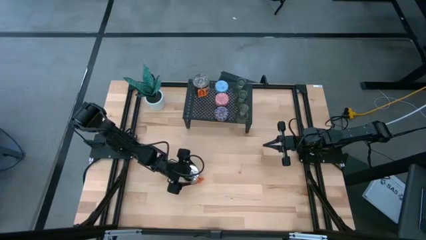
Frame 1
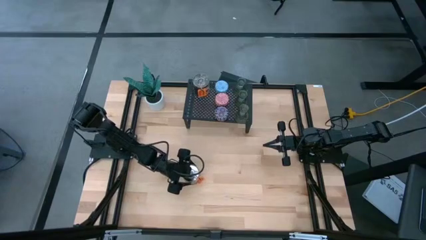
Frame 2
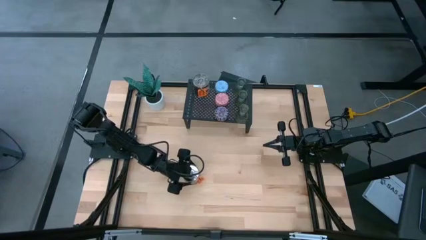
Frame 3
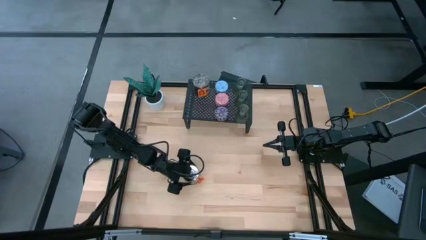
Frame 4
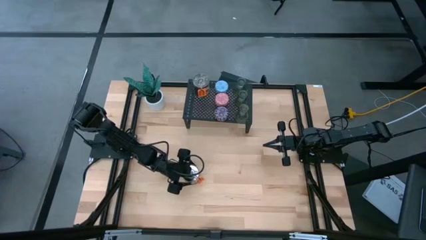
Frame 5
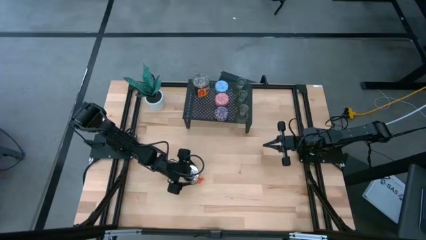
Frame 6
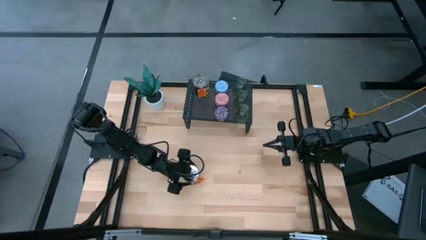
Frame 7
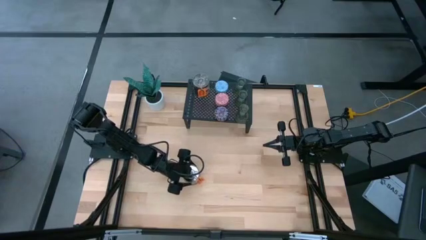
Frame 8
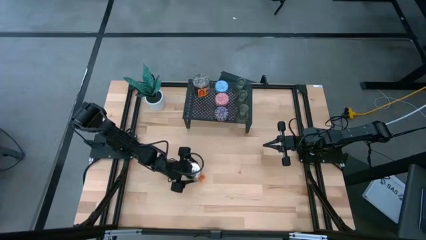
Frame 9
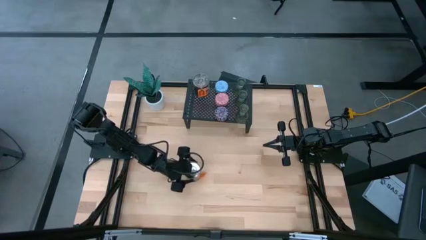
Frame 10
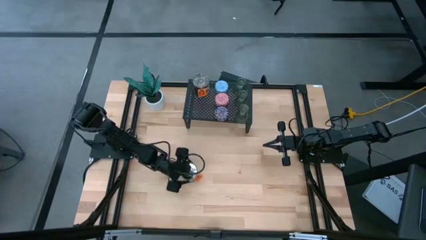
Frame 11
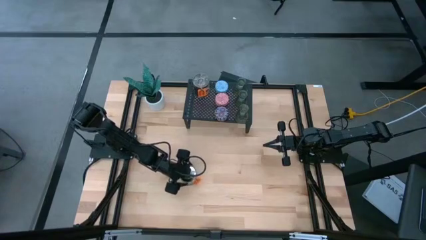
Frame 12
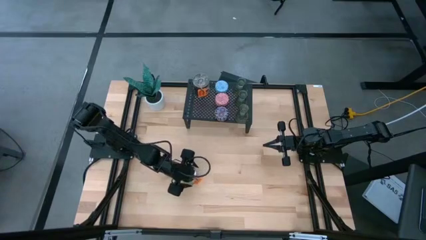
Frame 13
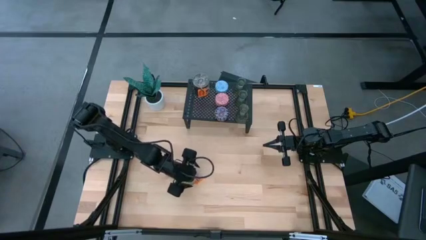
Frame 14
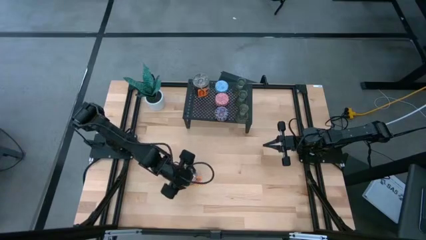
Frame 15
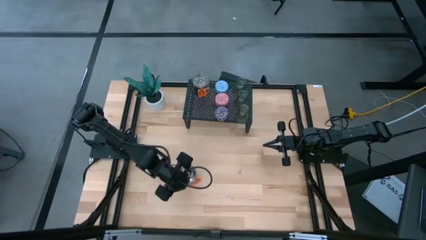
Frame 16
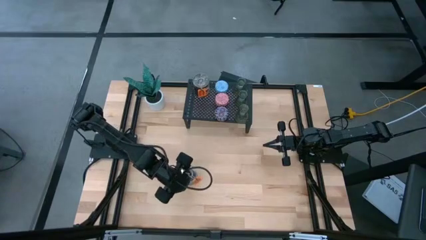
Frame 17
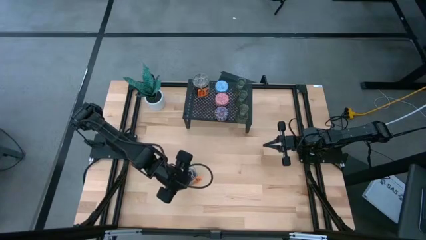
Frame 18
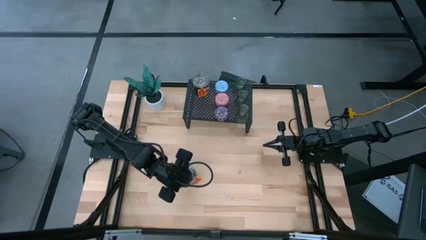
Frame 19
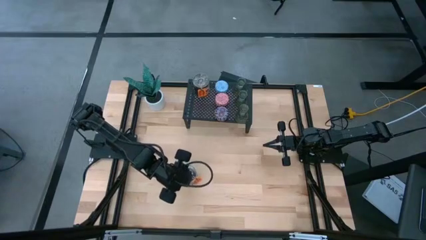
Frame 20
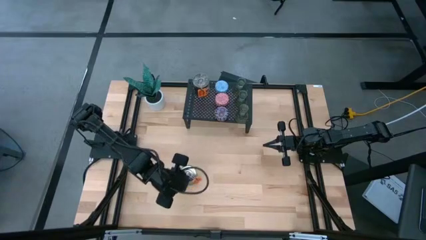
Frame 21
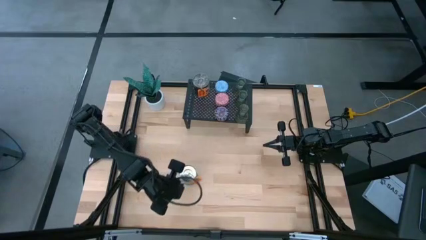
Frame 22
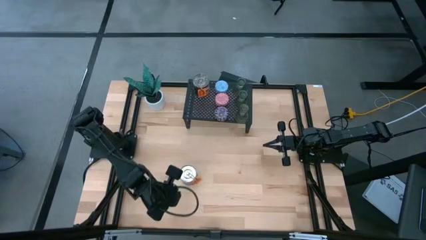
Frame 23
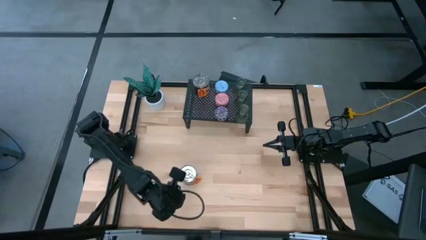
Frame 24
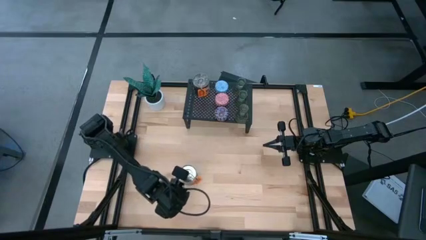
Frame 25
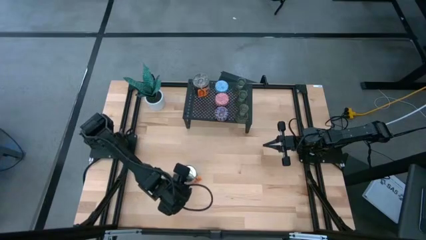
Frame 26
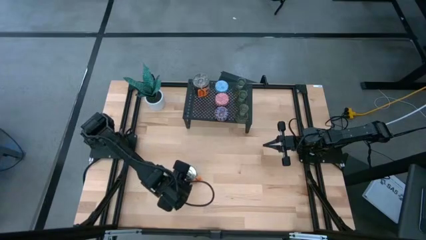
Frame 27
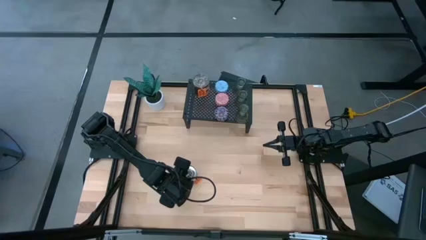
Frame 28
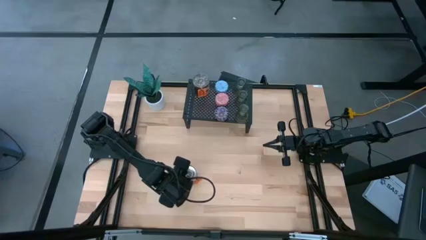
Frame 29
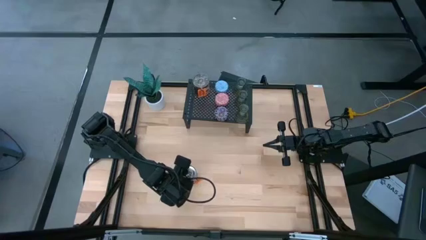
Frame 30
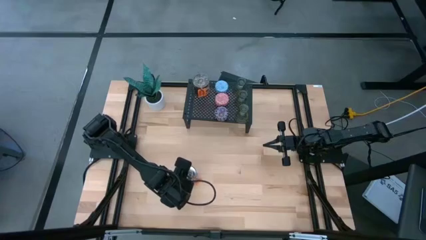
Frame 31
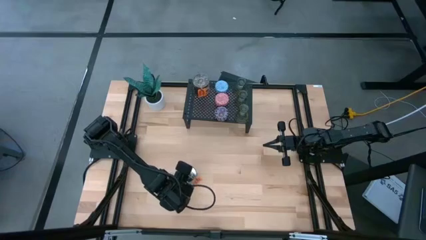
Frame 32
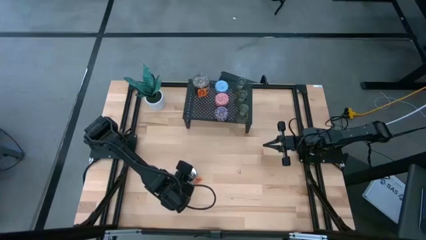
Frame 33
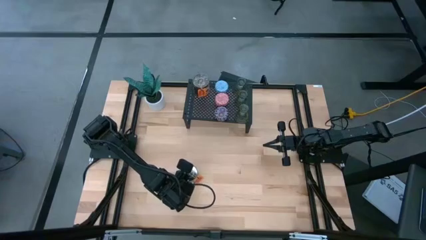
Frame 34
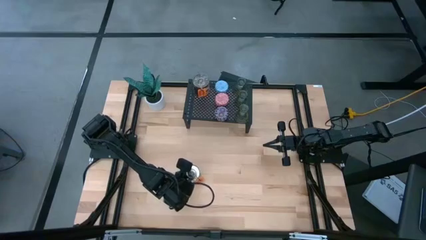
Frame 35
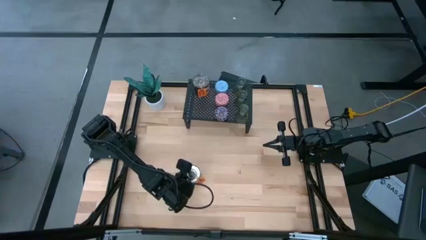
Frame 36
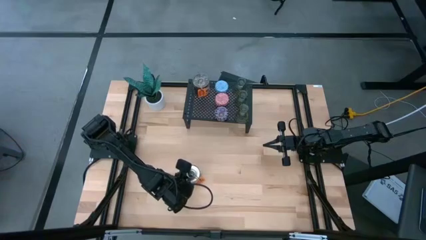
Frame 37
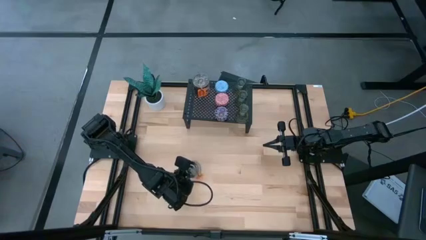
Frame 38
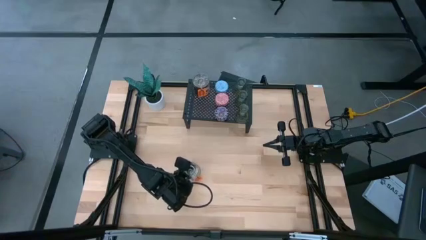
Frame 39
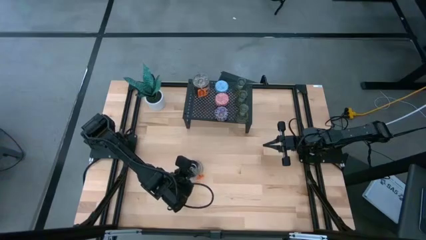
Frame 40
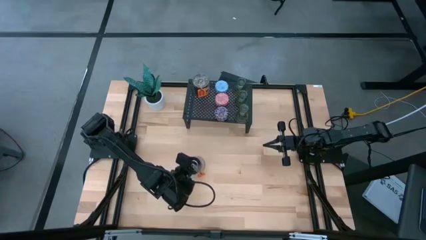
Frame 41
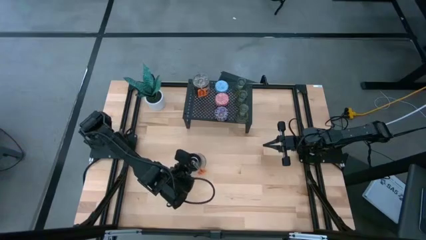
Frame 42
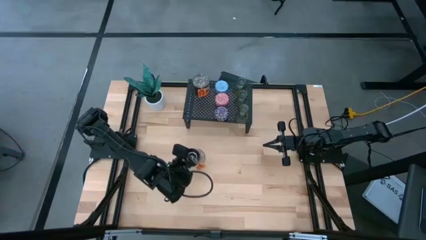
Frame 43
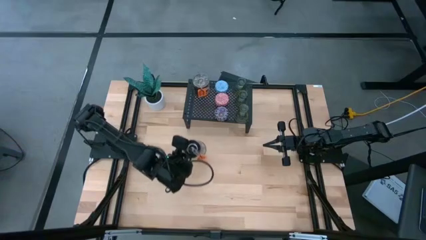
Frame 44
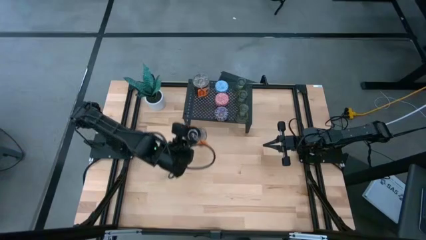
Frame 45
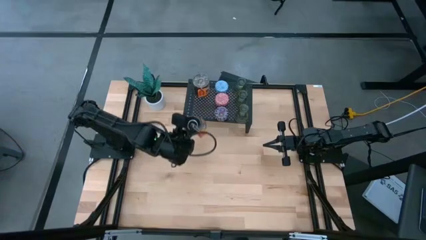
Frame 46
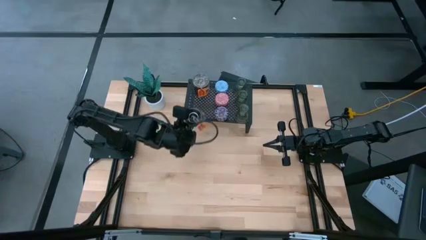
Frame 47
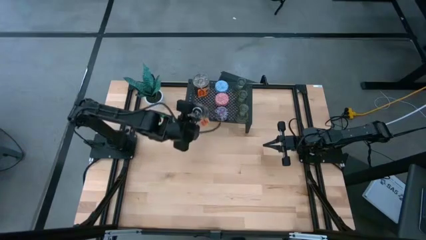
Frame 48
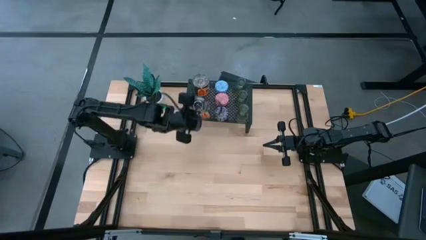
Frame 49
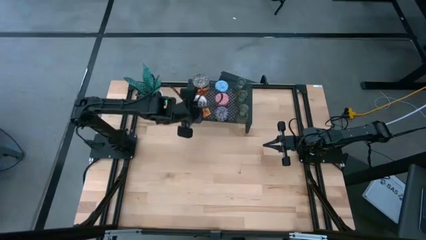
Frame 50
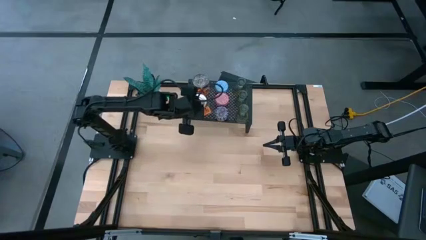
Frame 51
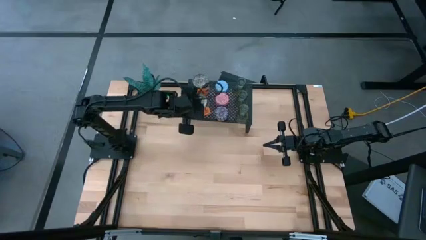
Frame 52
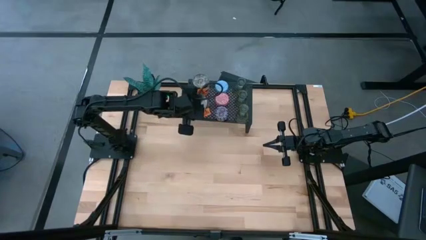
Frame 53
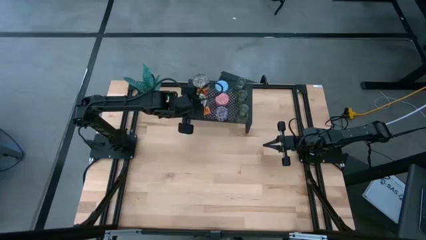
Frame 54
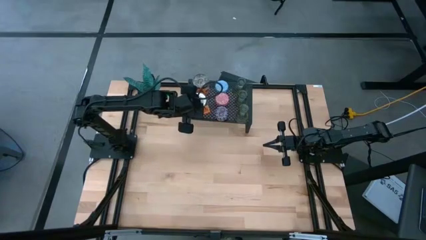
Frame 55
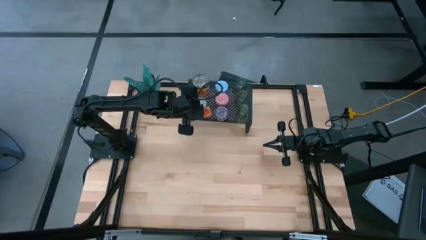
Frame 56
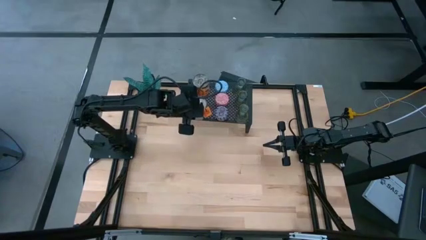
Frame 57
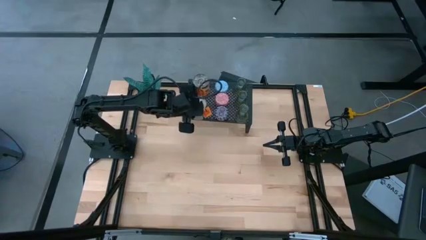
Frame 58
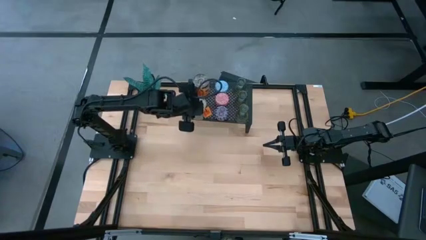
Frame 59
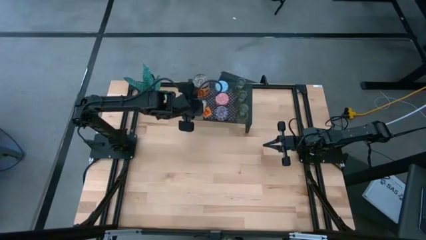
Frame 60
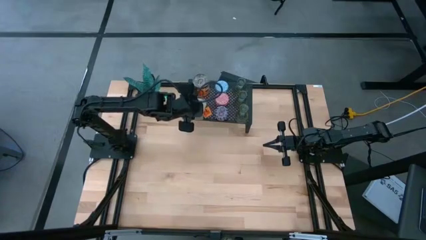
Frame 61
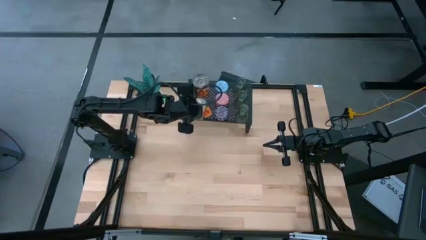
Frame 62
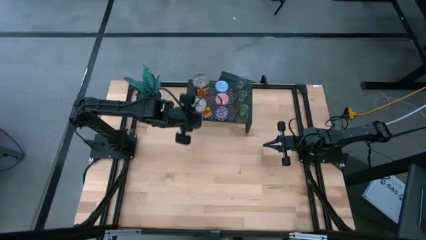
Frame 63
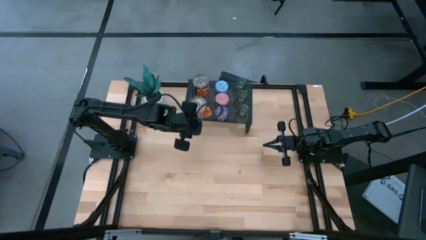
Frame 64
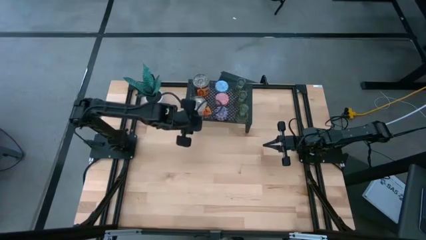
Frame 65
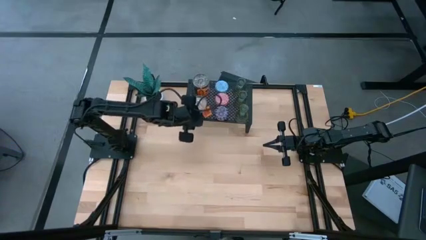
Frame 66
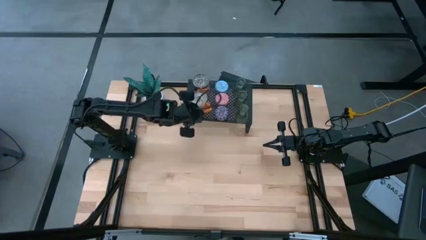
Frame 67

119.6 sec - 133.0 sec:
Task: Pick & Place candle stick holders
Put the scented candle can on the shelf
